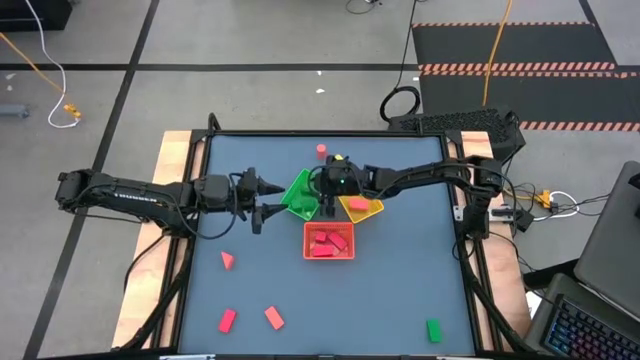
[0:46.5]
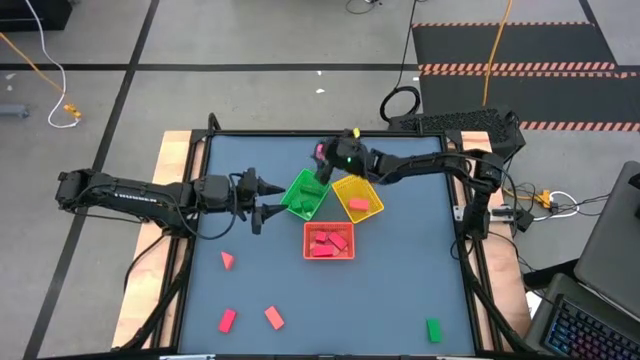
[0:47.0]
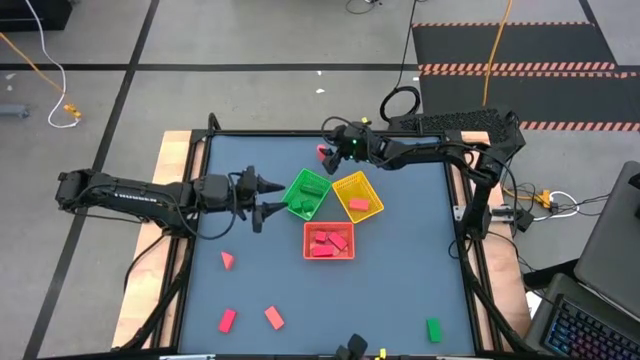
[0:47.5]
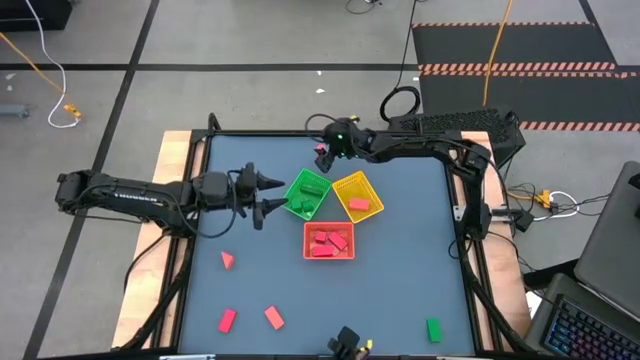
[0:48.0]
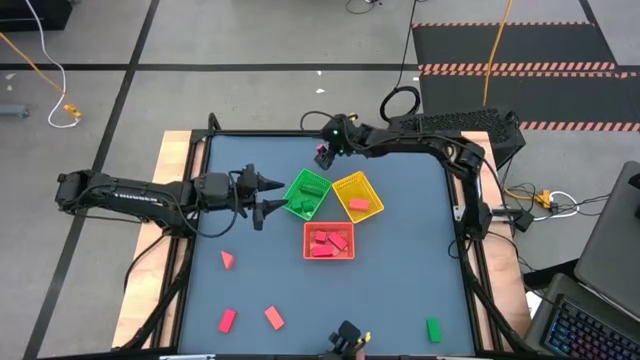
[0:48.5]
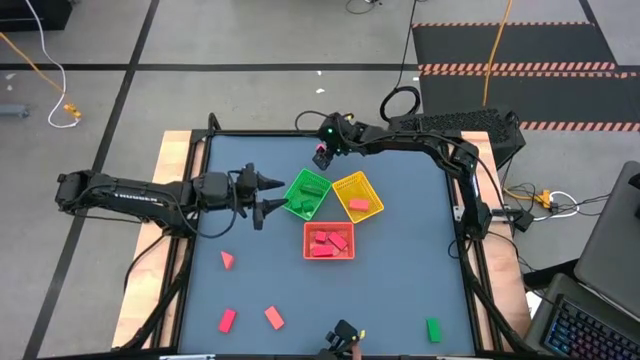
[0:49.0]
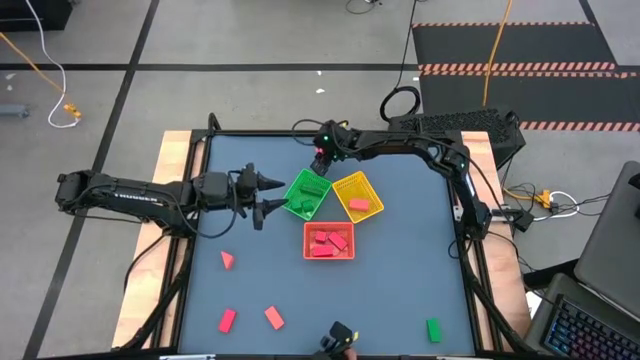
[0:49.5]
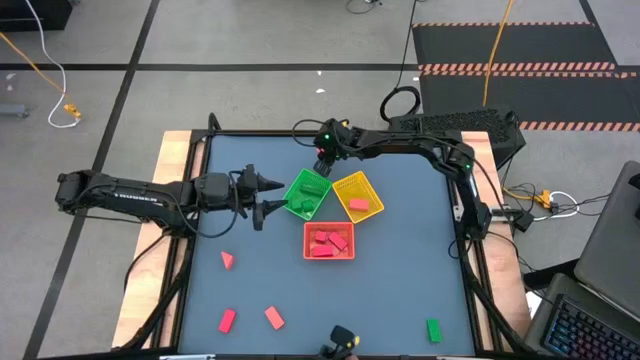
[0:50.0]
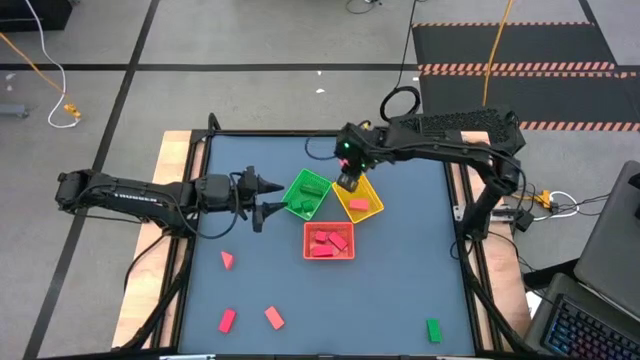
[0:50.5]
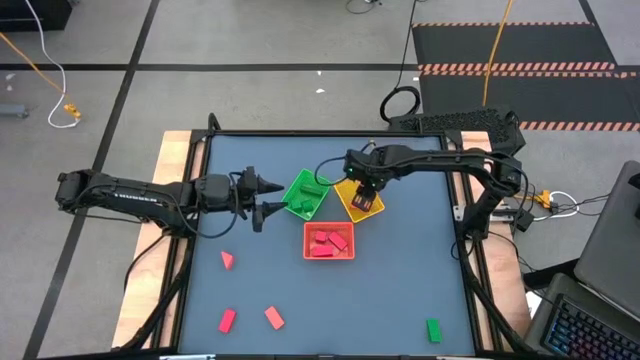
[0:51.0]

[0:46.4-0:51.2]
Task: Sort & place blocks by color
Put the orange block into the yellow bin

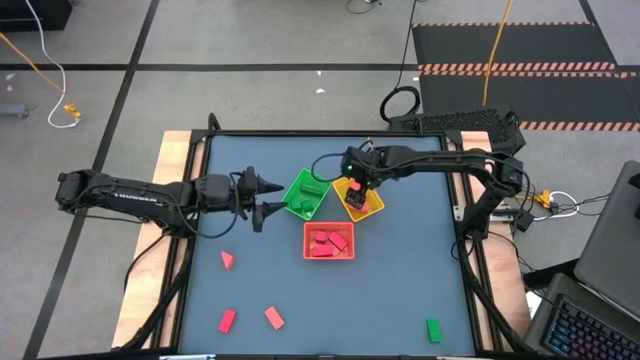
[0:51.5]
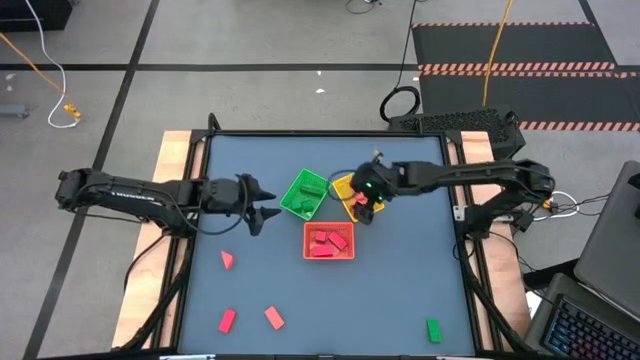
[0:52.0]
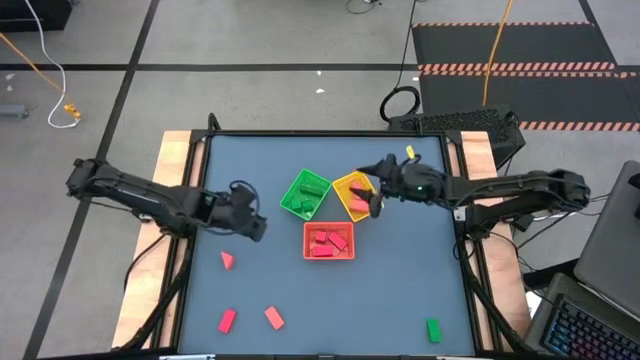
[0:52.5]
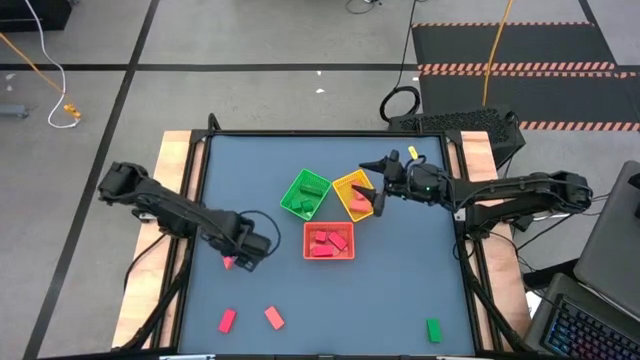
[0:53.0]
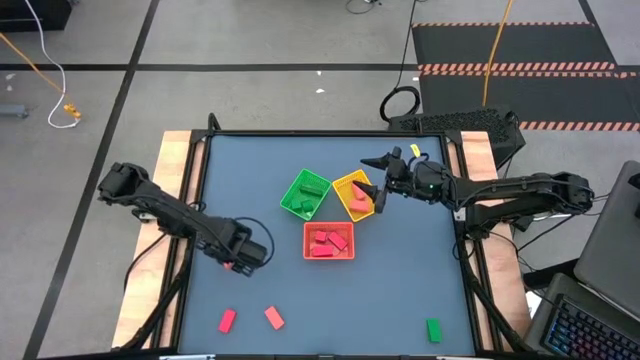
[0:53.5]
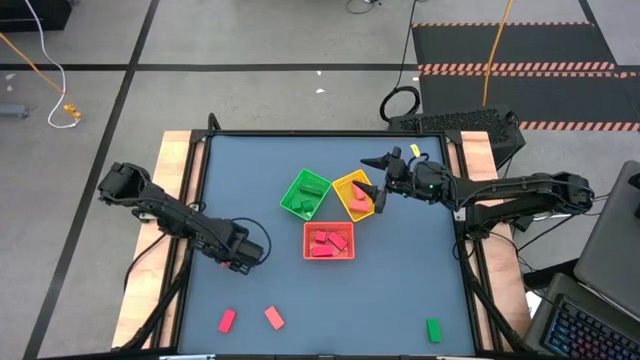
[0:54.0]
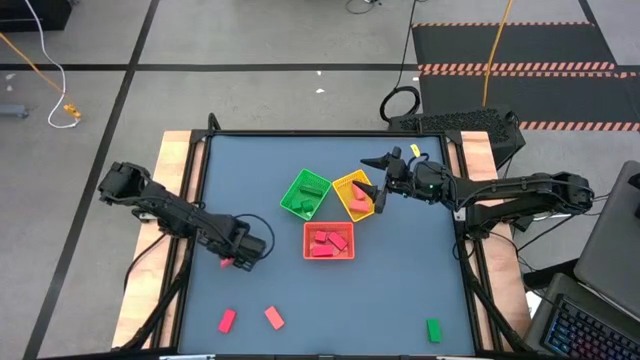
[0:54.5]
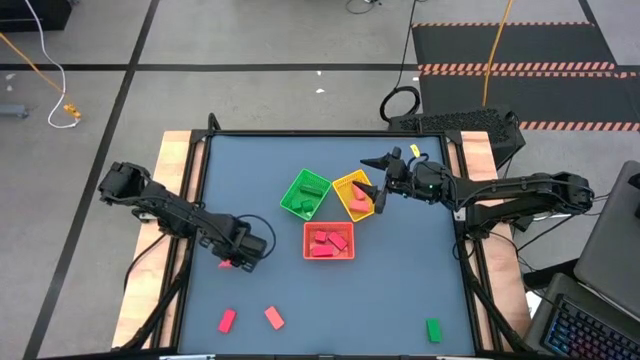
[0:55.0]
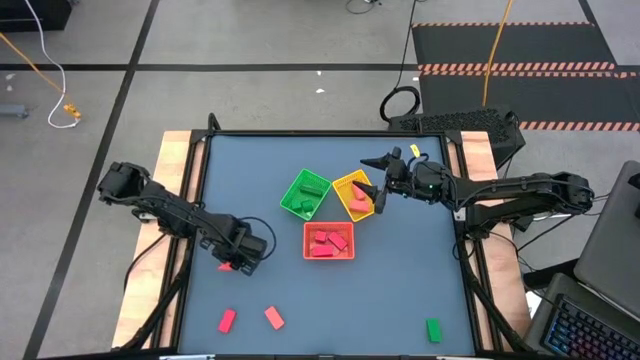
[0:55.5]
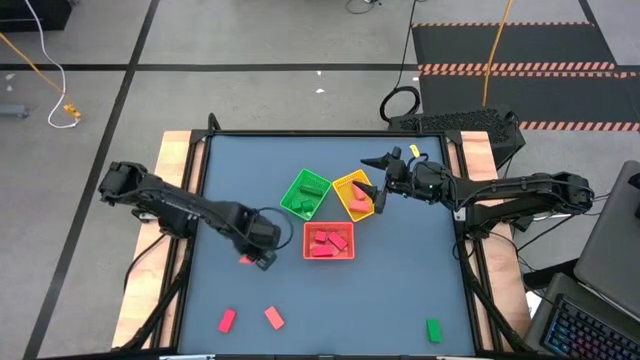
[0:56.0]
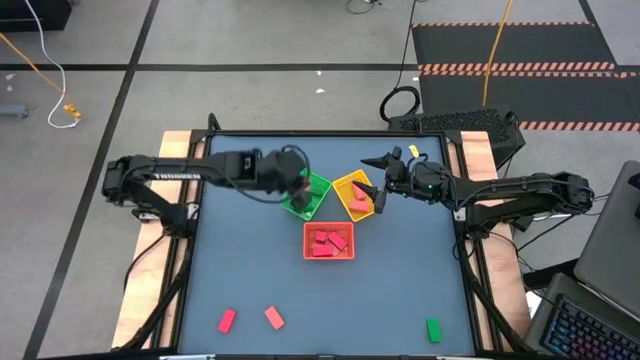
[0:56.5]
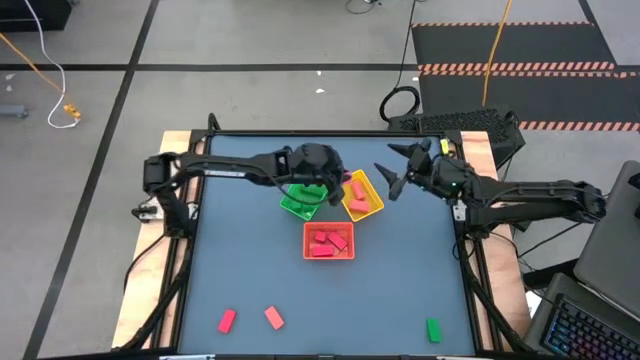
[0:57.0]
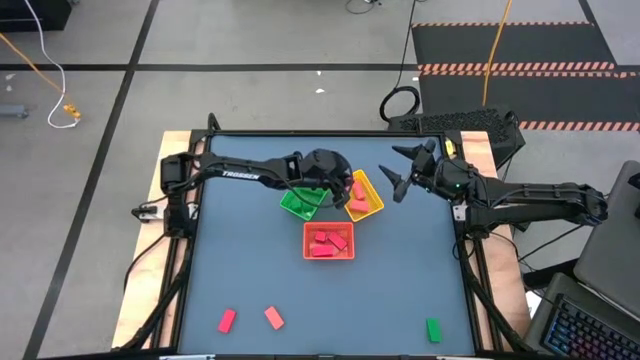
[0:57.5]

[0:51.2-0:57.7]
Put the orange block into the yellow bin

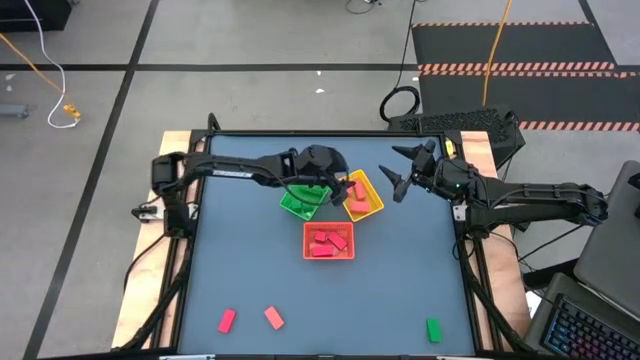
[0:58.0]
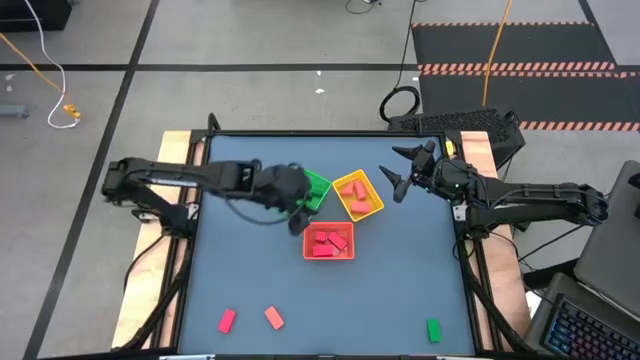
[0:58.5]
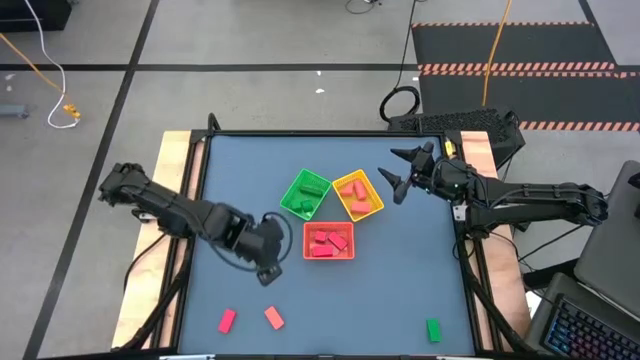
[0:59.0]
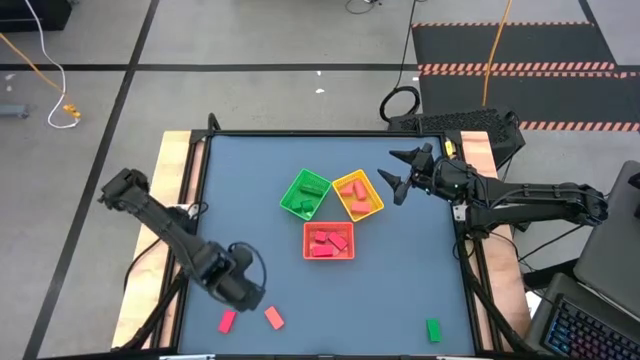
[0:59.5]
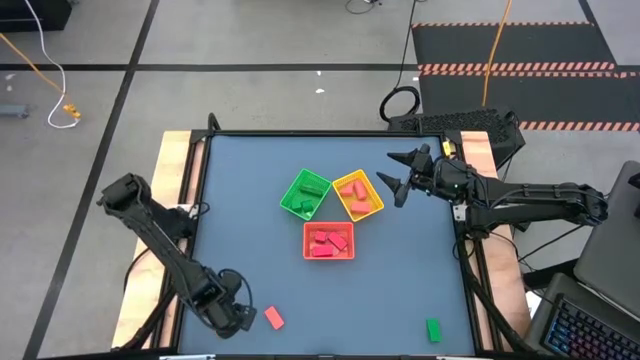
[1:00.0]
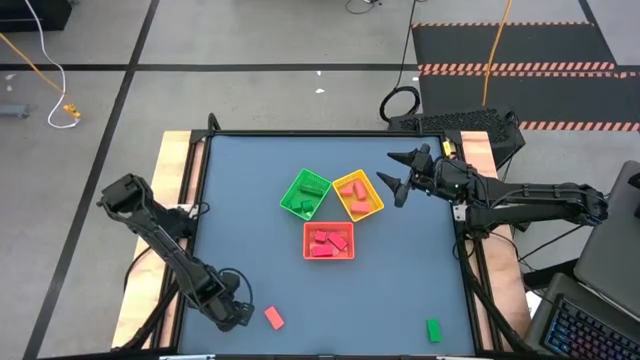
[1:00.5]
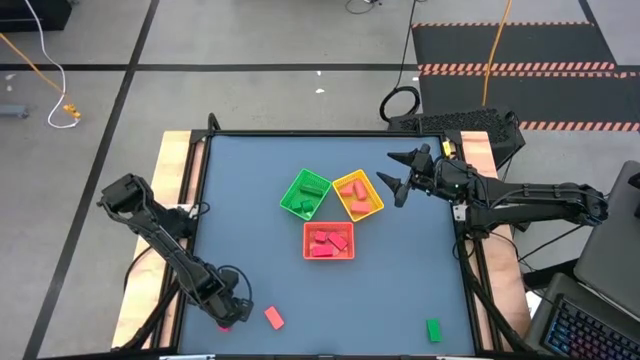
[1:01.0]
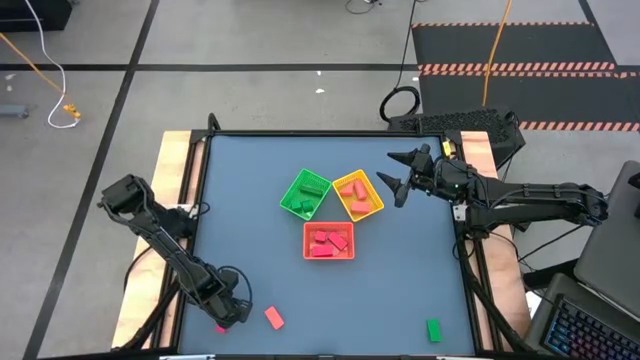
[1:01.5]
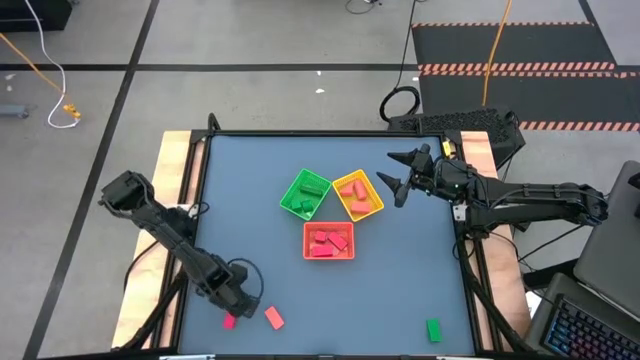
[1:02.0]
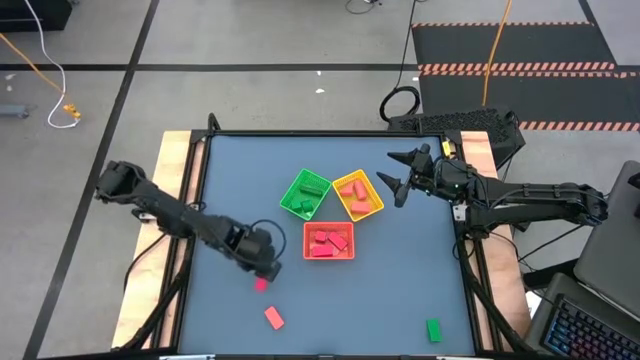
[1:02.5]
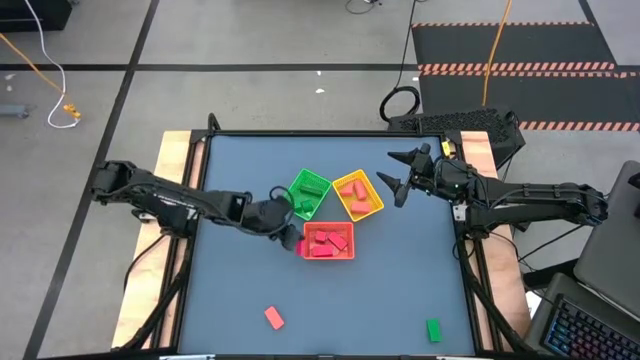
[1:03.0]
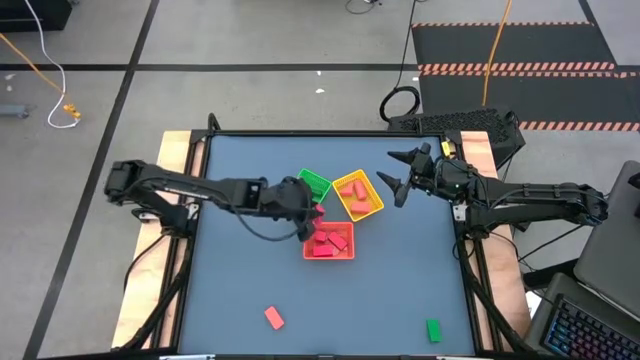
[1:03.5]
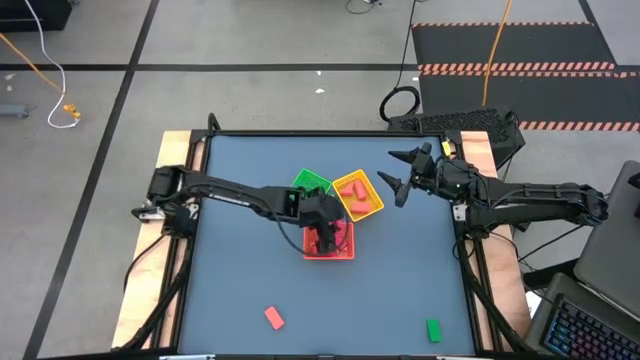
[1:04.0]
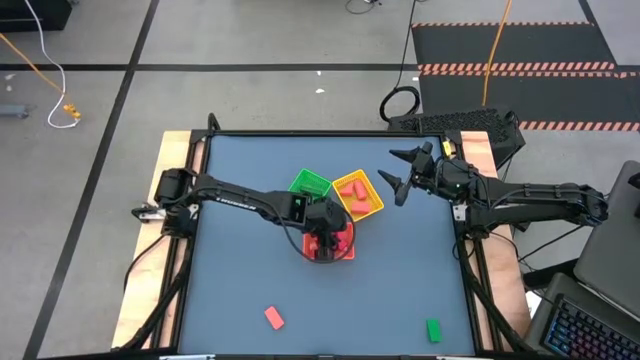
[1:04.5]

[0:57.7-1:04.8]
Put the red block into the orange bin

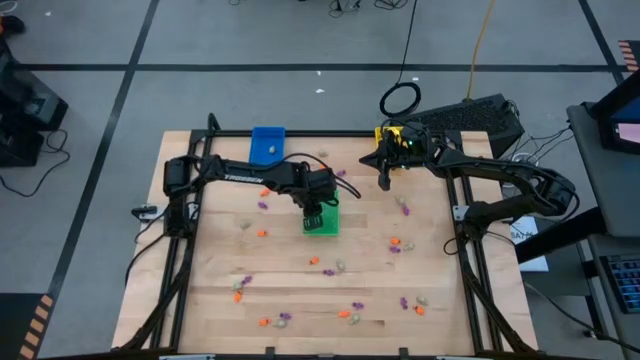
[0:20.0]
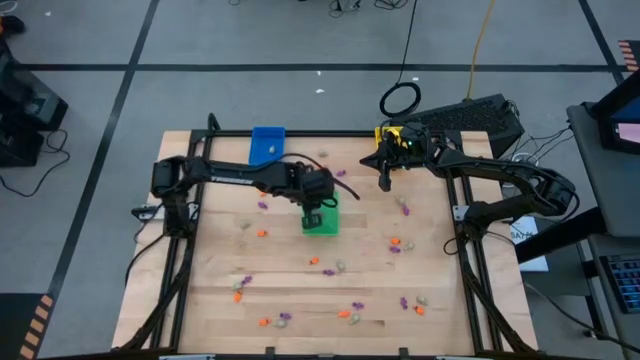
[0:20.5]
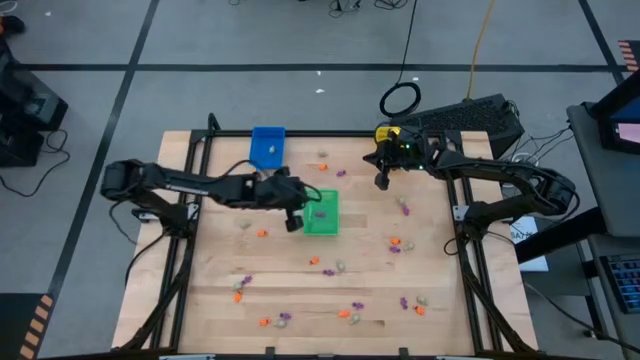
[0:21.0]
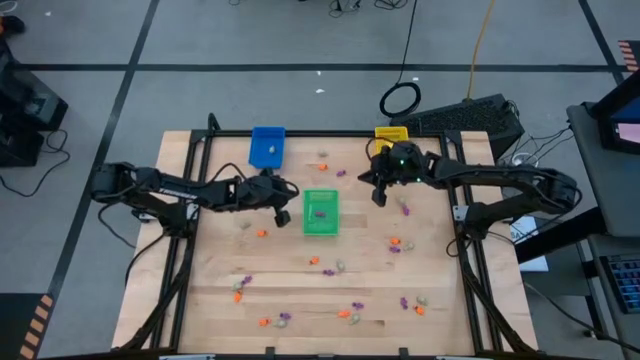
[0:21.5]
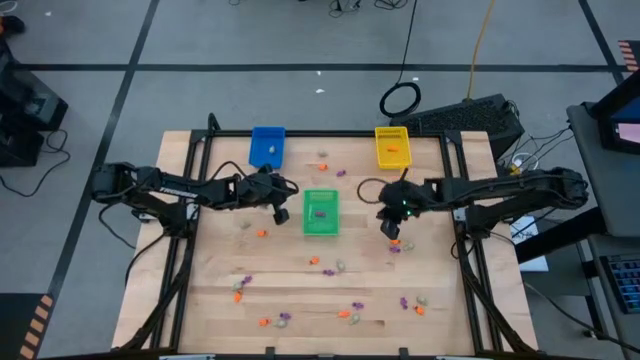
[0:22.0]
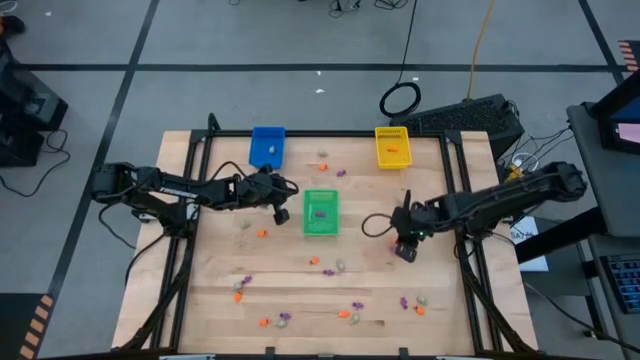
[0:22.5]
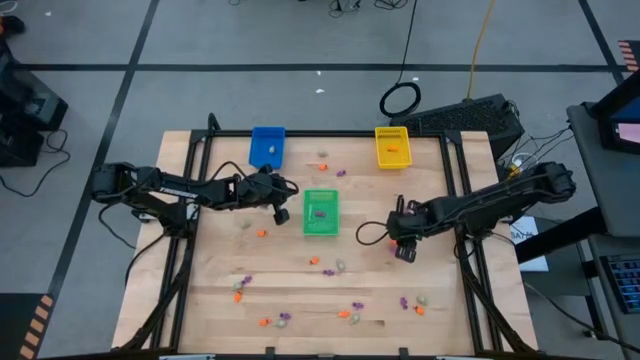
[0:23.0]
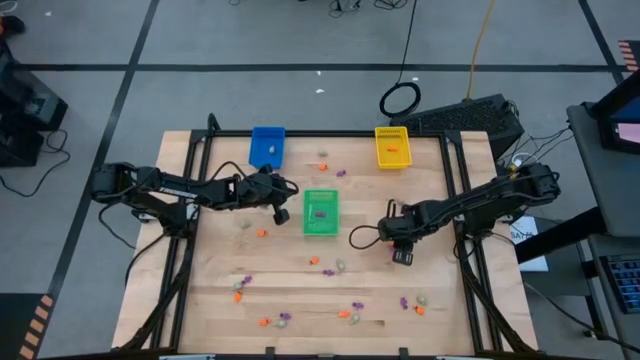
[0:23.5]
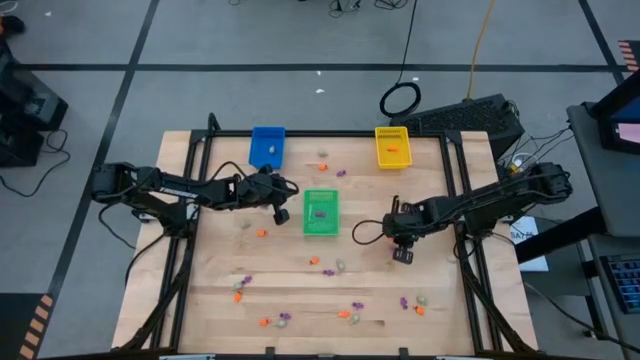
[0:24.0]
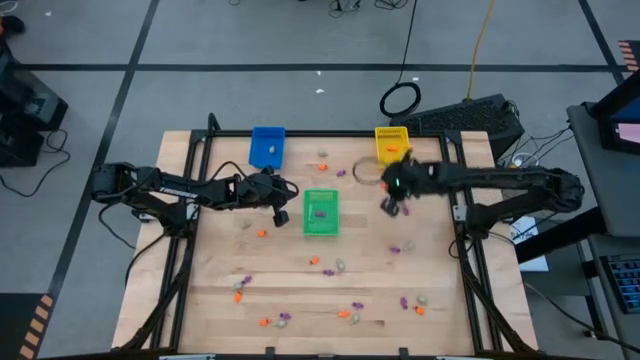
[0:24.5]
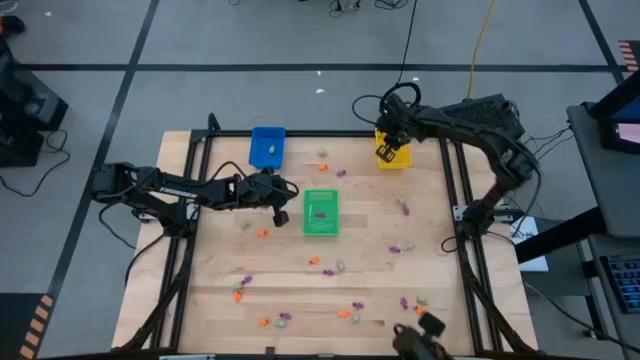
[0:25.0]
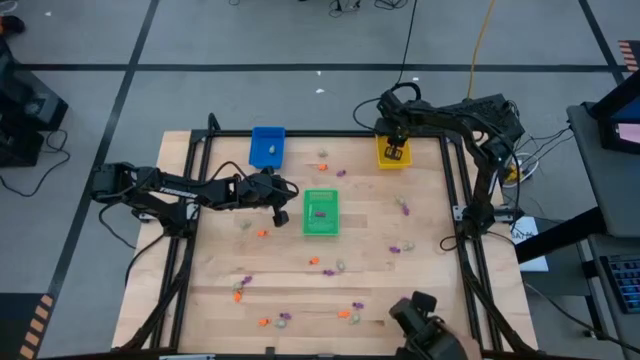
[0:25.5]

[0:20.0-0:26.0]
Task: Sort Halloween decoration
Put the orange skeleton toy into the yellow bin
